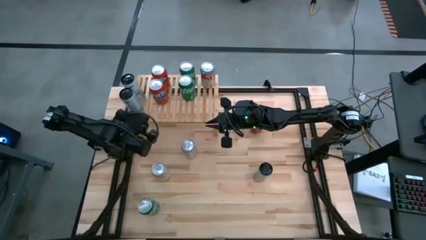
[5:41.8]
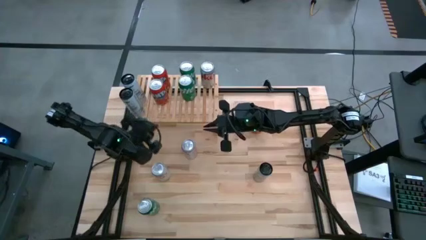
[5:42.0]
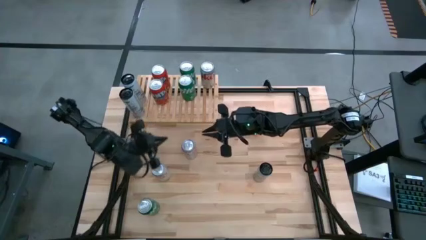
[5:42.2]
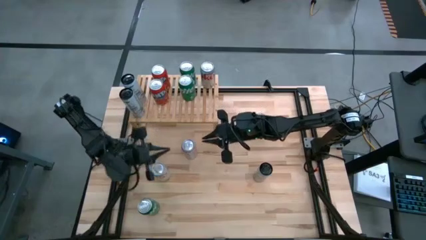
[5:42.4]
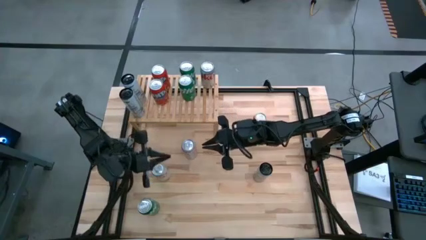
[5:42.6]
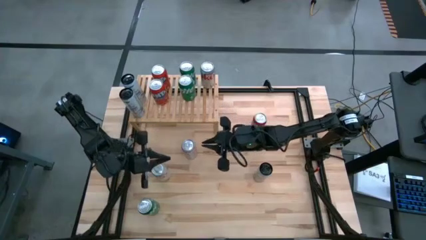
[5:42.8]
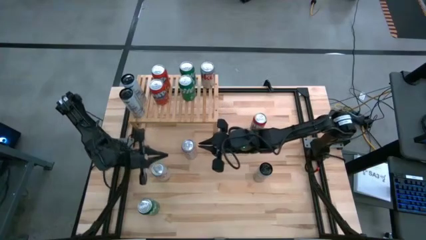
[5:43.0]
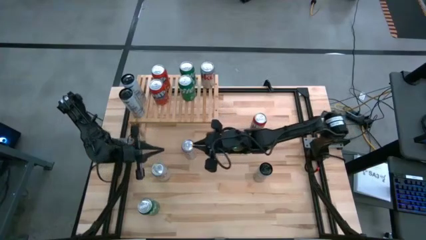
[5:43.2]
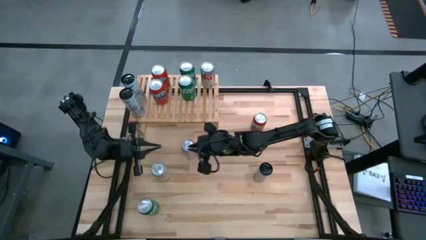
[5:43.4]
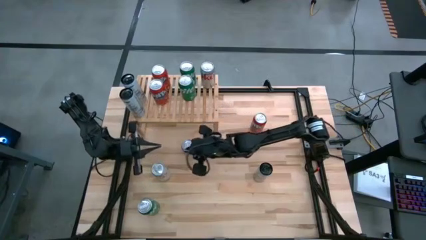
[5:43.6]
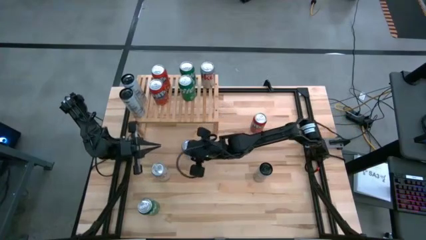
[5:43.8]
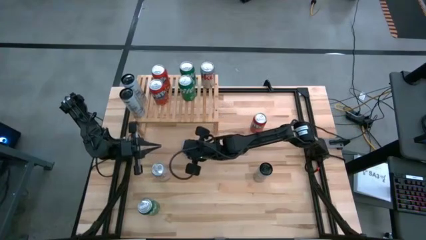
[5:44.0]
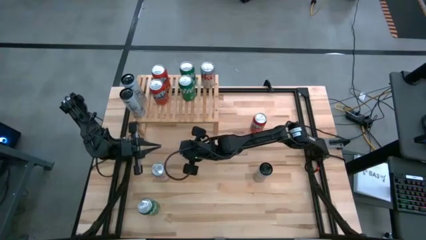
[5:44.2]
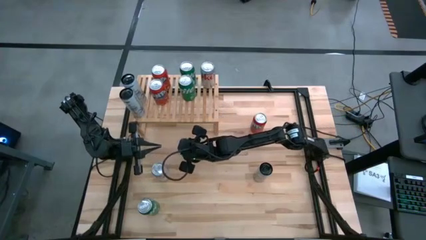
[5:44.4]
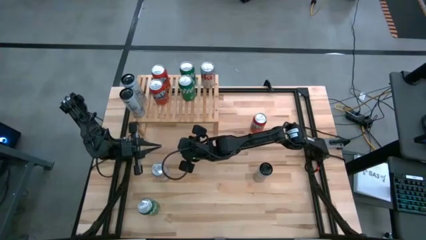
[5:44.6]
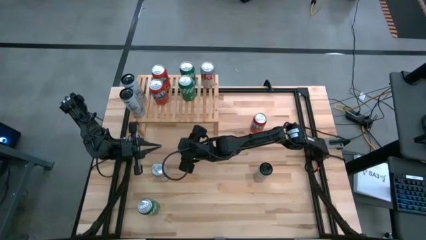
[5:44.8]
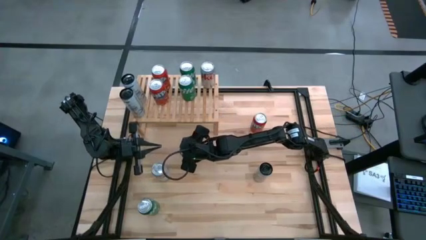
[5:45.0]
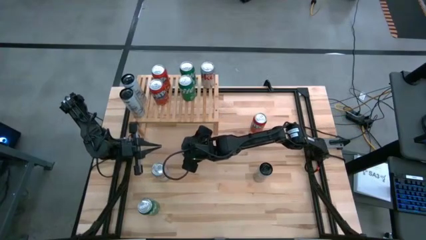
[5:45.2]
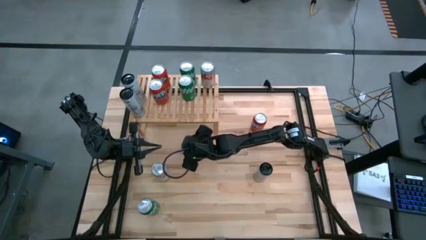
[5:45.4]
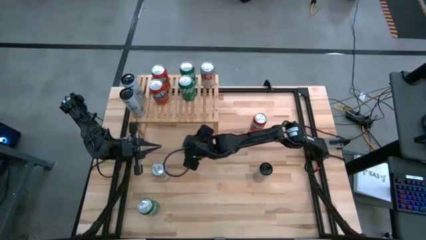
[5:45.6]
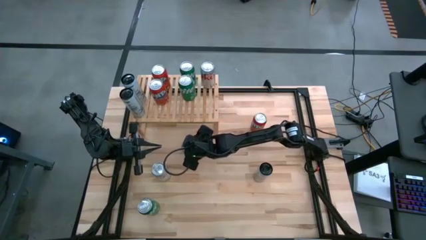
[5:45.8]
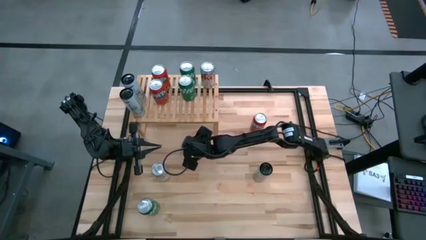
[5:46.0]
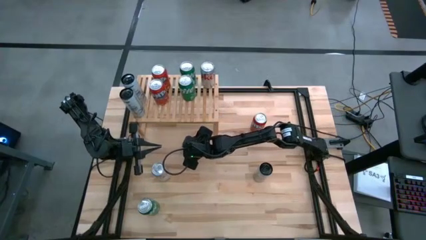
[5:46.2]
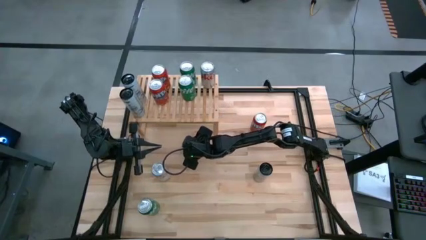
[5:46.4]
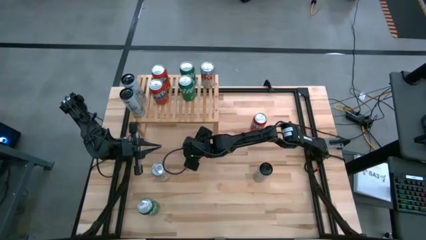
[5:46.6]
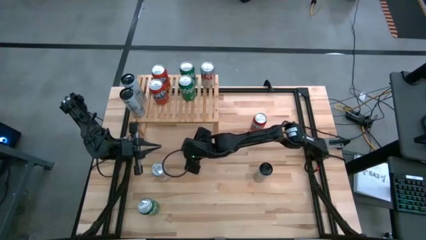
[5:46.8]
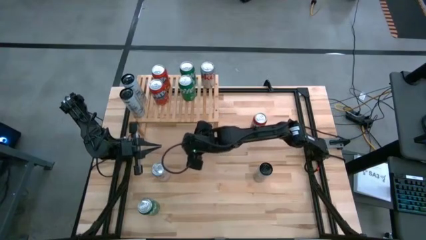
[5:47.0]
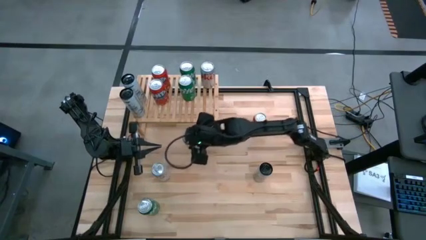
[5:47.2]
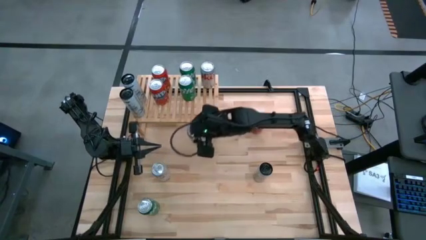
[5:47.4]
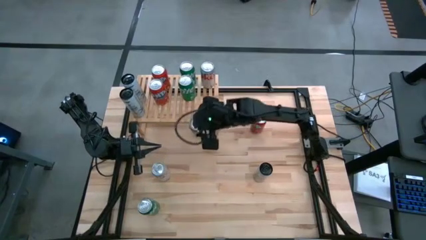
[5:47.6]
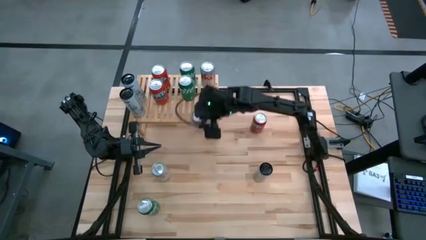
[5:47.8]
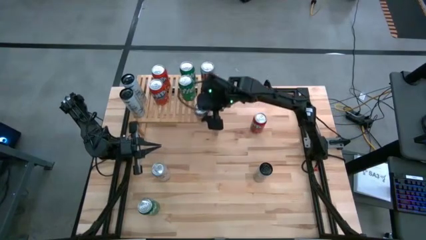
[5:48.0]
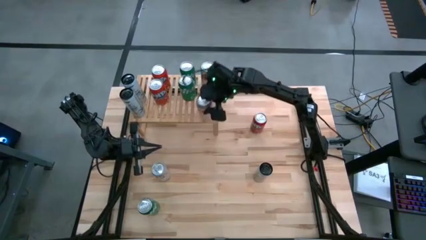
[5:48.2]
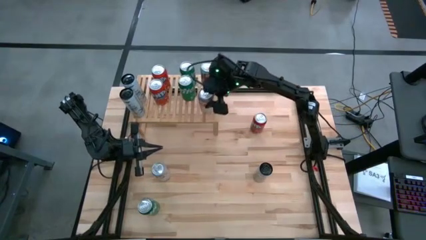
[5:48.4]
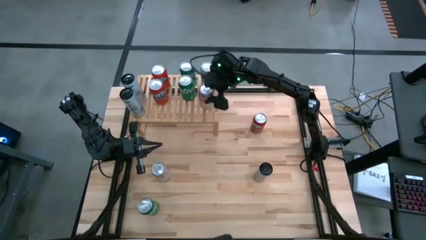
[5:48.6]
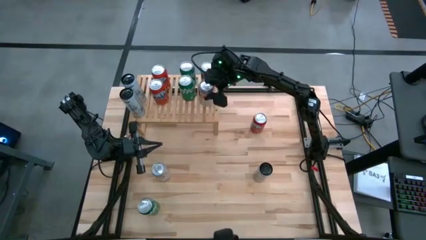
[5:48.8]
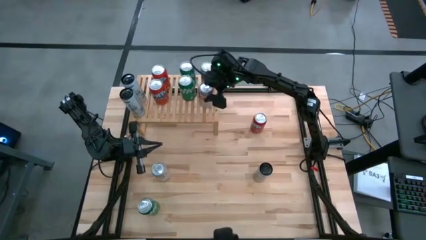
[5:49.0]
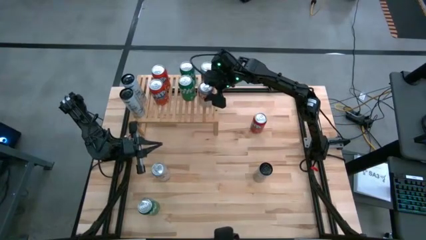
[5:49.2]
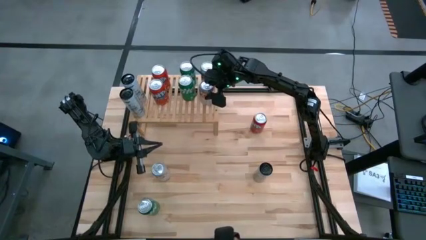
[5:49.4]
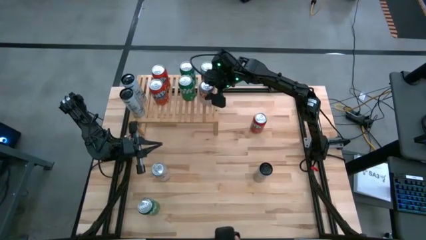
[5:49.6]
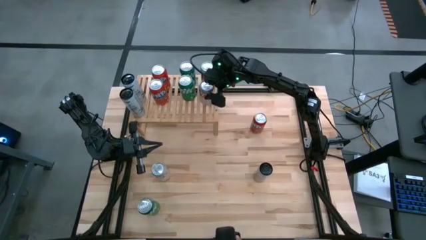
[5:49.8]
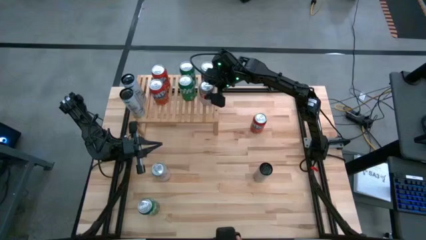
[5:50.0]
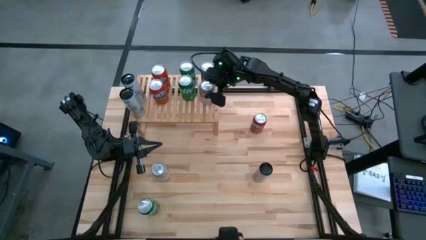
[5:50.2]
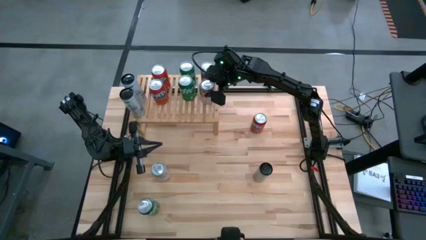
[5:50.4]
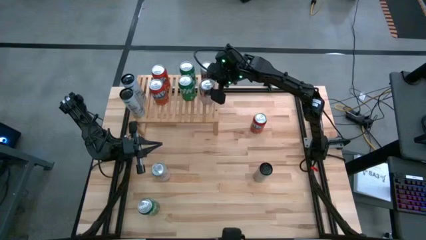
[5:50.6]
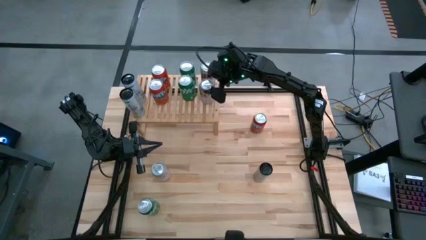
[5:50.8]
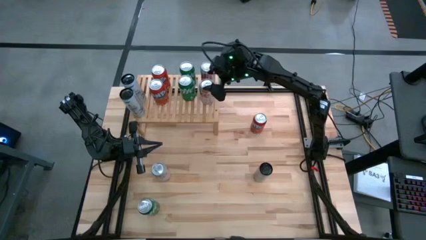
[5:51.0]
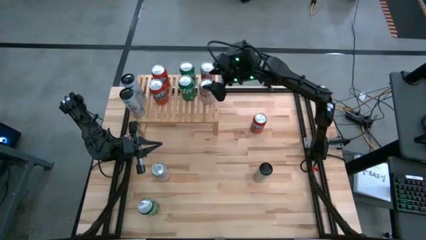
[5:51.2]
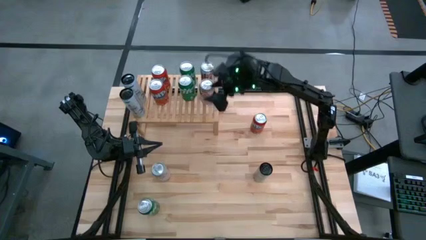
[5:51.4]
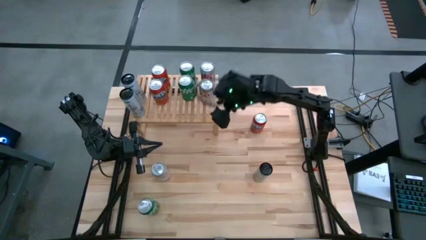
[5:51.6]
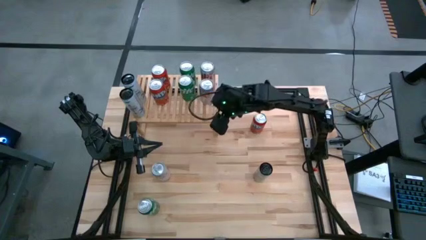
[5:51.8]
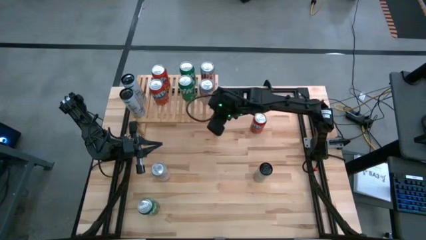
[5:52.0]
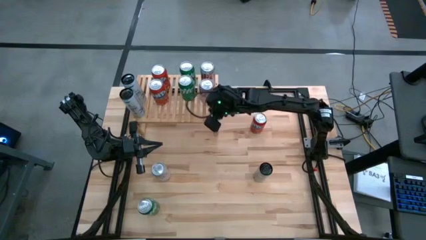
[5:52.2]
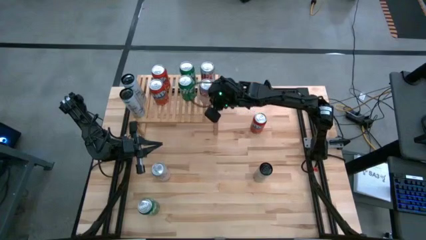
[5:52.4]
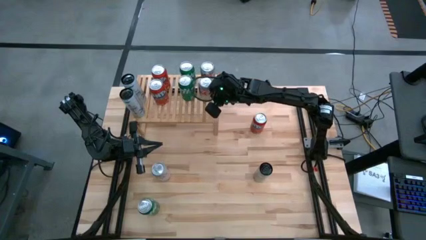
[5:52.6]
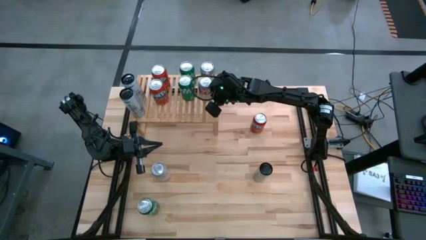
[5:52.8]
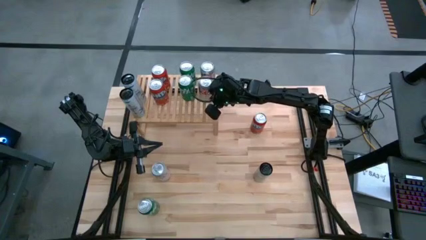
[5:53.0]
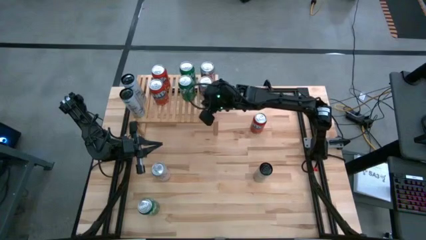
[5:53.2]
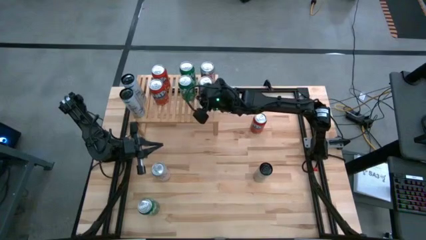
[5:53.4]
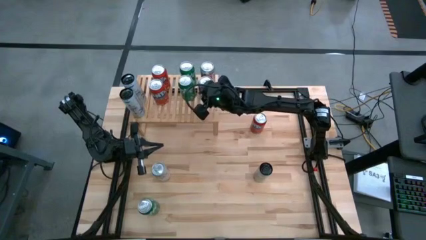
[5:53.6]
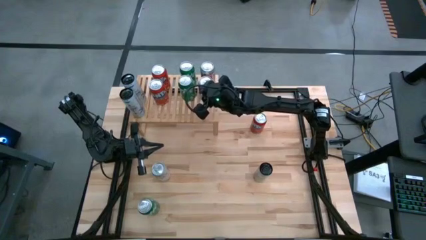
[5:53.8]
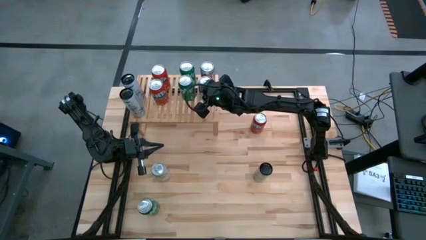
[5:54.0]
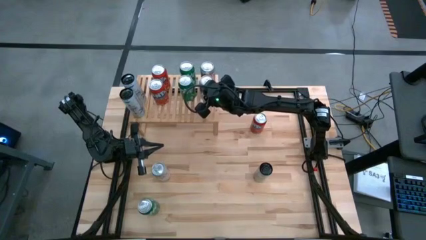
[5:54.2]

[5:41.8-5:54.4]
Task: Place canned beverage on shelf
Put the top red/silver soda can on the shelf aligned with the other red/silver soda can

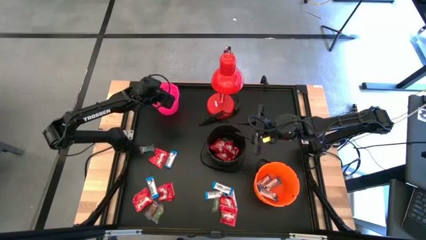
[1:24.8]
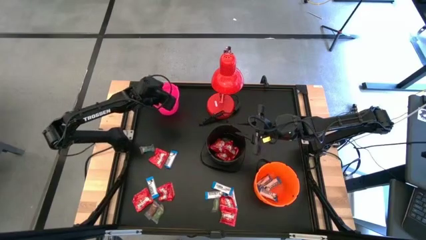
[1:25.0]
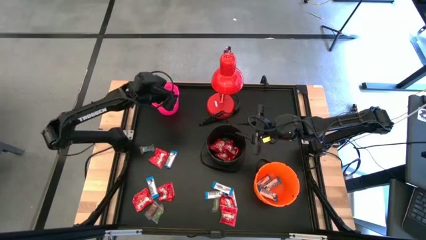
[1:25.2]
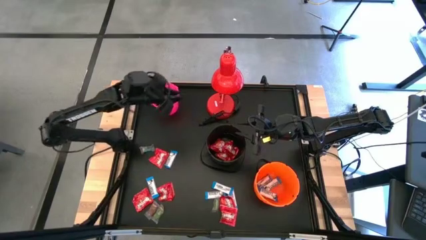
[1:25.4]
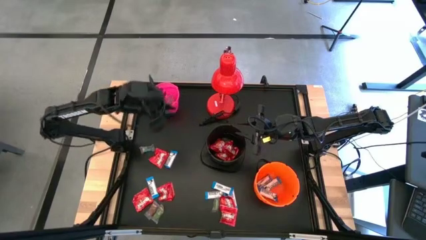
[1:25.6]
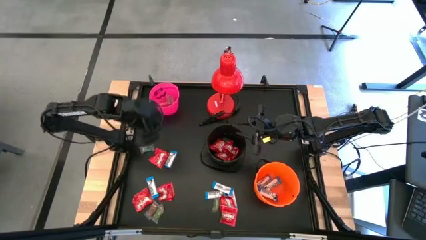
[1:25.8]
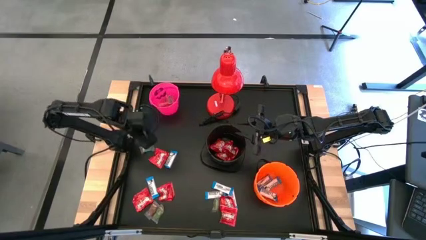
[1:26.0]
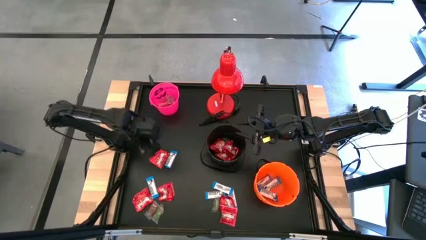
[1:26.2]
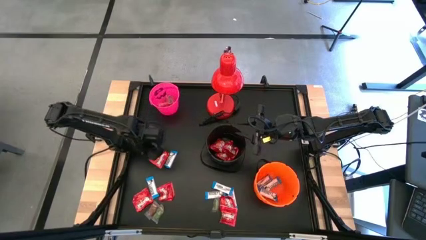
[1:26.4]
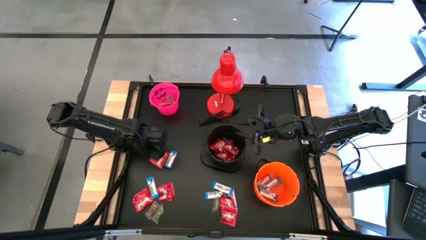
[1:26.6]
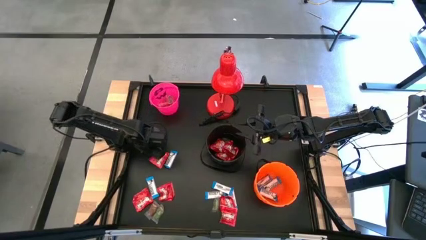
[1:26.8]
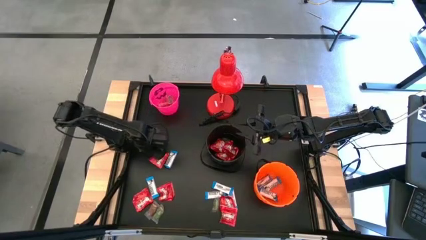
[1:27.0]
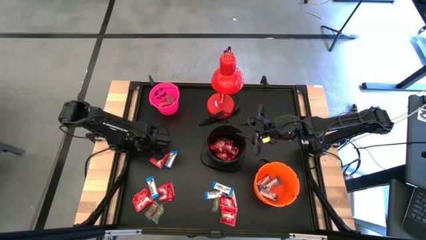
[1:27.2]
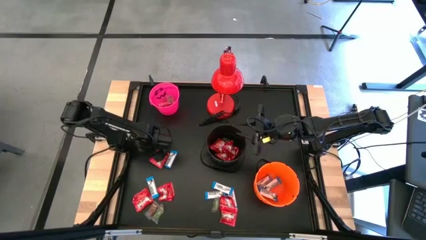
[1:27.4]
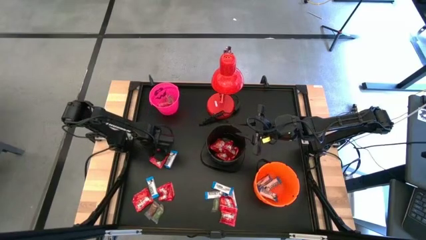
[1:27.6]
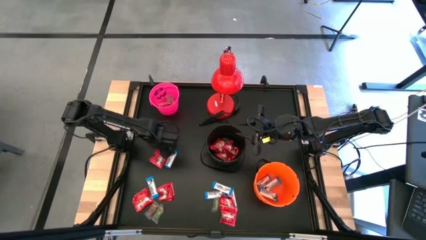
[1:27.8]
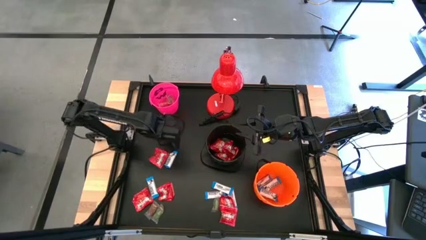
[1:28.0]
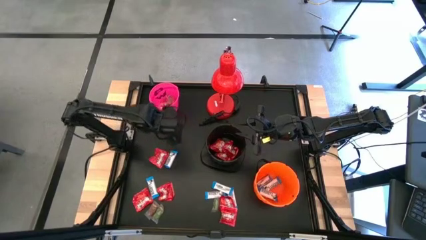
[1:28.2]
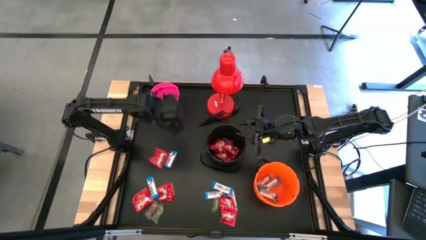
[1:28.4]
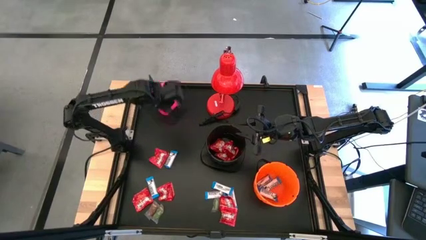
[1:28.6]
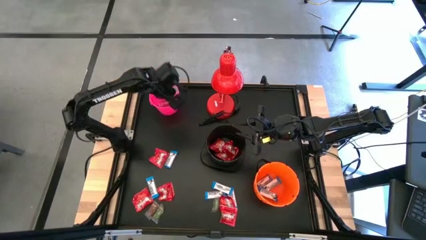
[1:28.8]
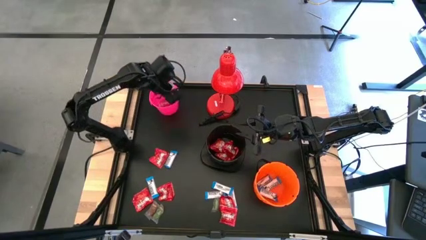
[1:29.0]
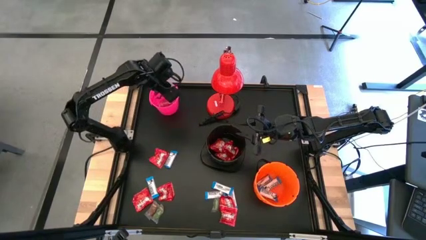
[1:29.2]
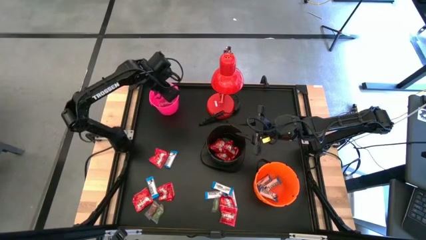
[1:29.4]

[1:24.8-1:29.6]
Task: Organize candy in baskets
Put the blue gummy into the pink bucket
